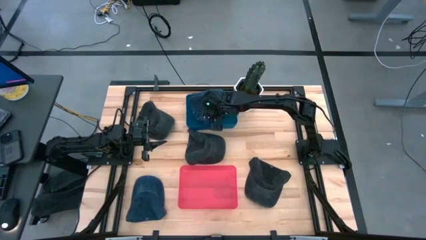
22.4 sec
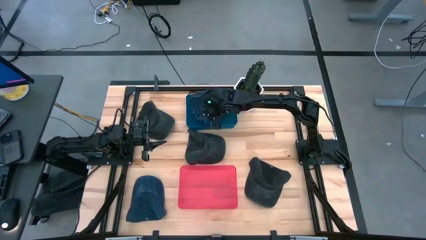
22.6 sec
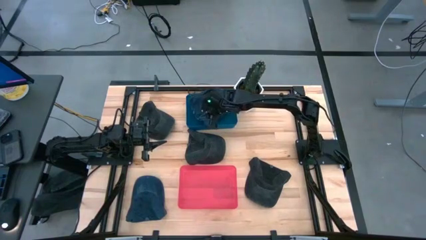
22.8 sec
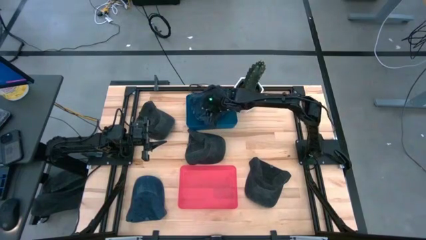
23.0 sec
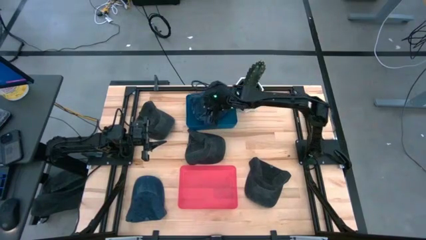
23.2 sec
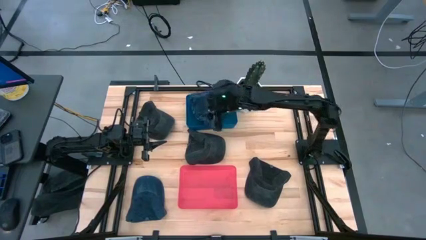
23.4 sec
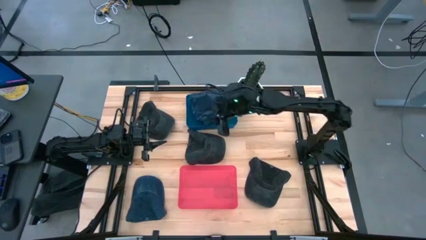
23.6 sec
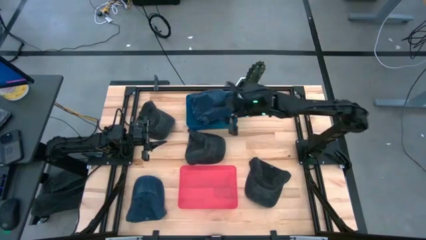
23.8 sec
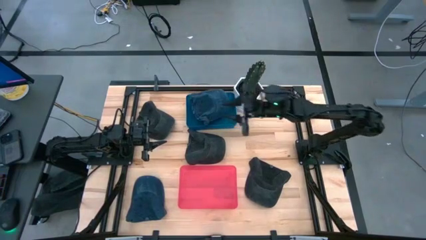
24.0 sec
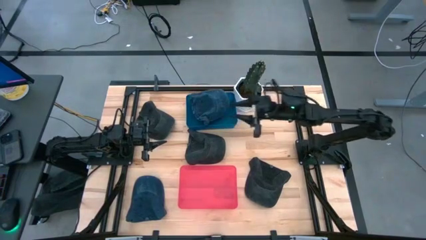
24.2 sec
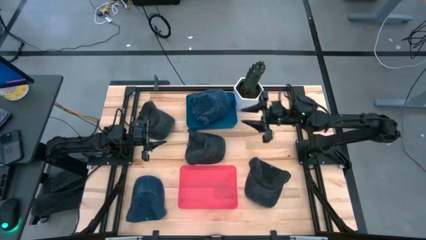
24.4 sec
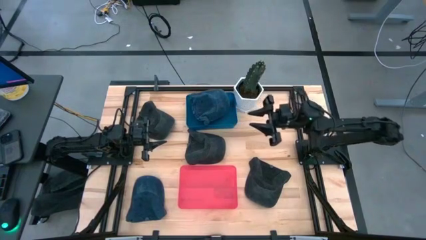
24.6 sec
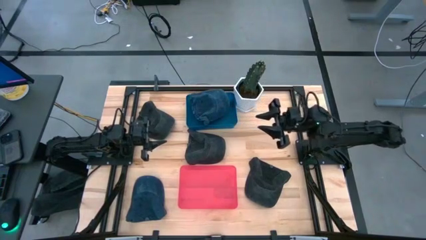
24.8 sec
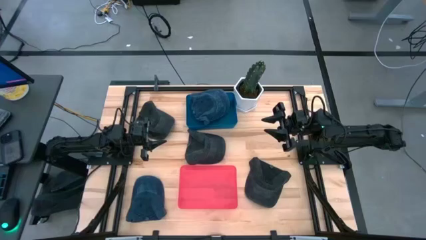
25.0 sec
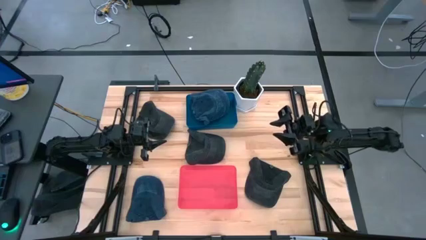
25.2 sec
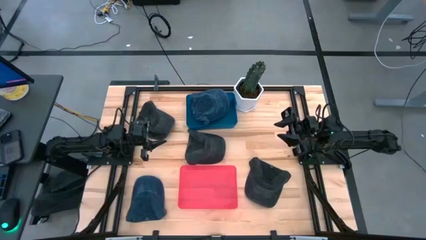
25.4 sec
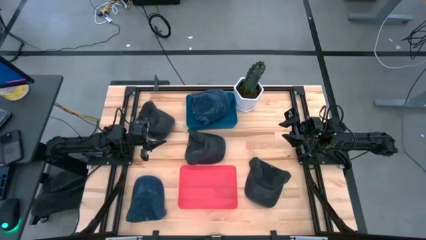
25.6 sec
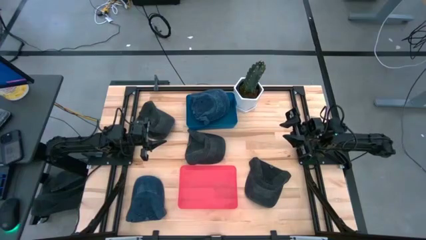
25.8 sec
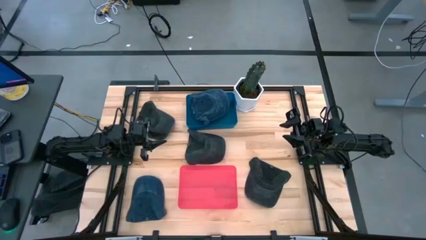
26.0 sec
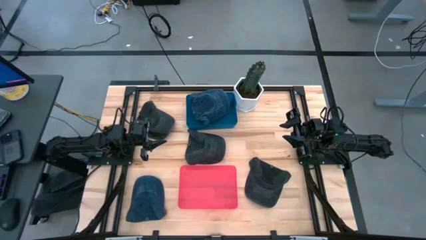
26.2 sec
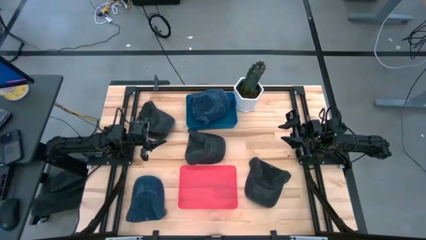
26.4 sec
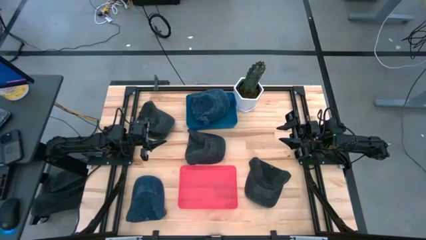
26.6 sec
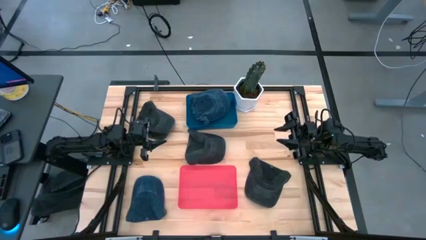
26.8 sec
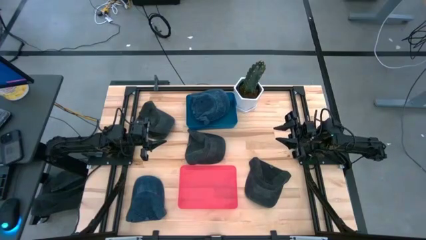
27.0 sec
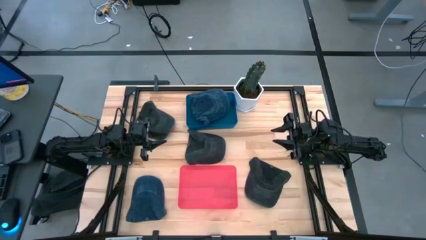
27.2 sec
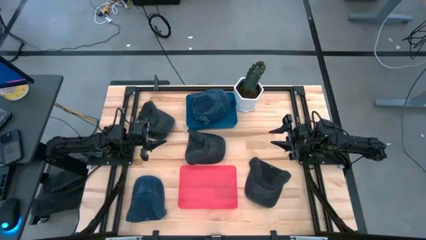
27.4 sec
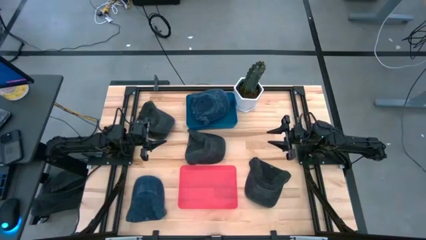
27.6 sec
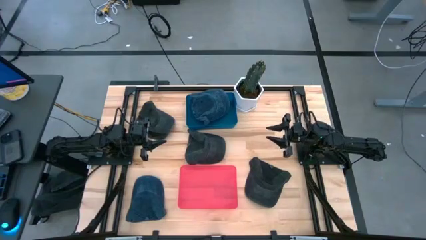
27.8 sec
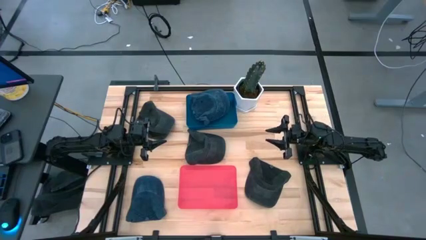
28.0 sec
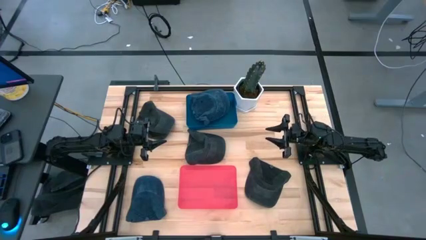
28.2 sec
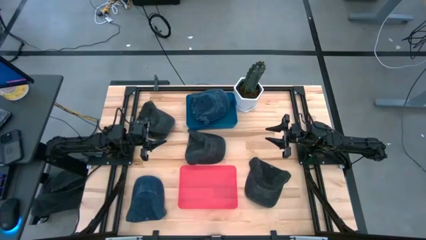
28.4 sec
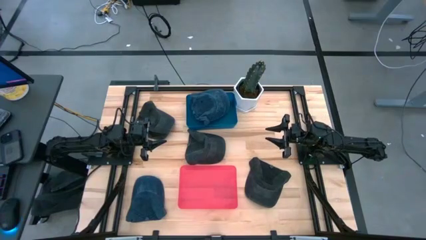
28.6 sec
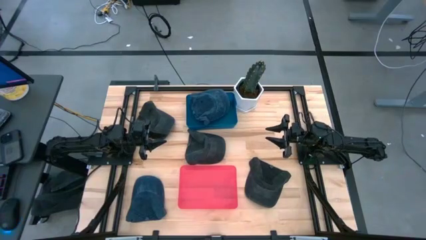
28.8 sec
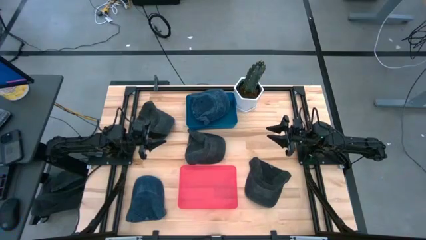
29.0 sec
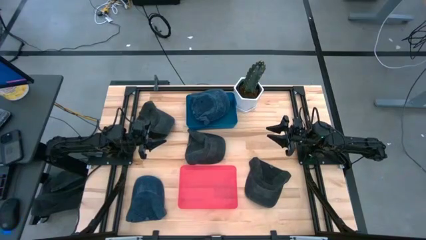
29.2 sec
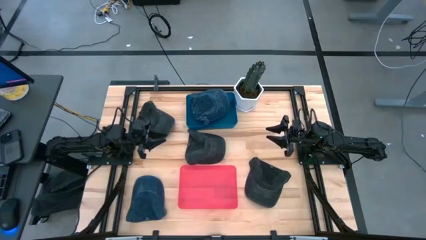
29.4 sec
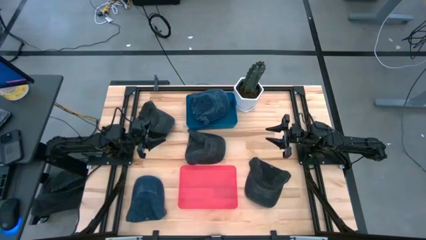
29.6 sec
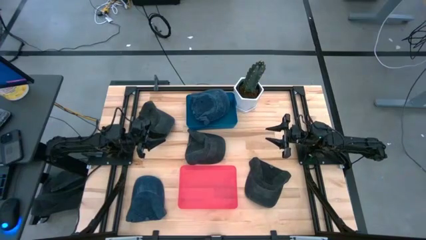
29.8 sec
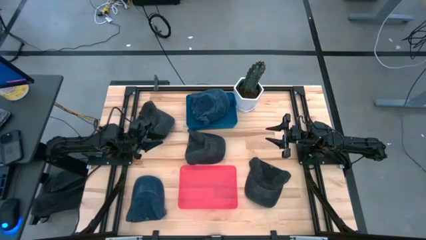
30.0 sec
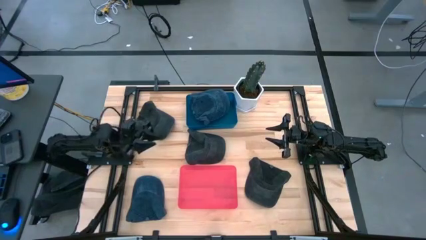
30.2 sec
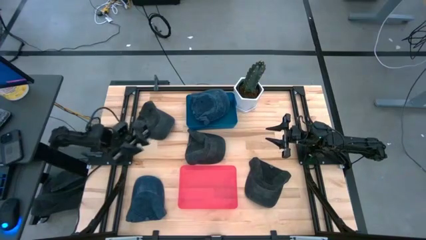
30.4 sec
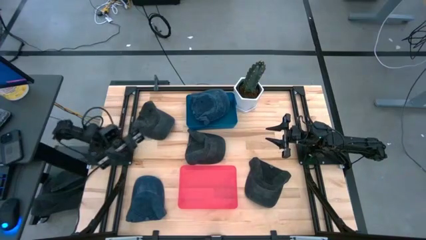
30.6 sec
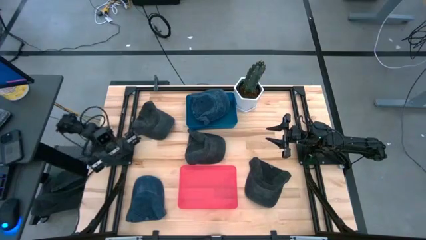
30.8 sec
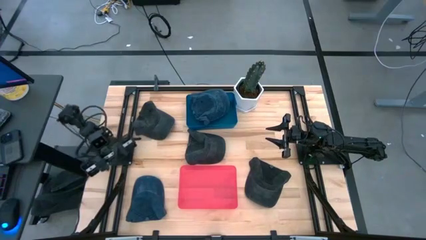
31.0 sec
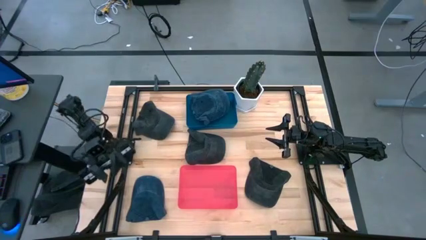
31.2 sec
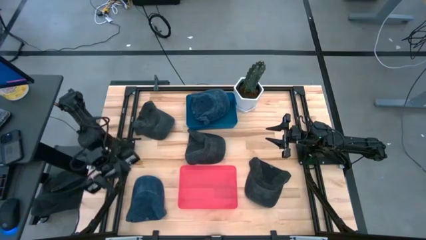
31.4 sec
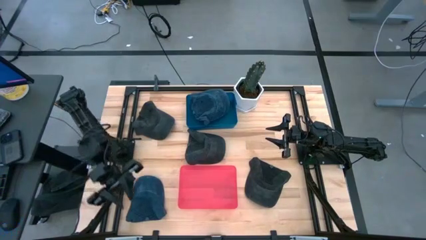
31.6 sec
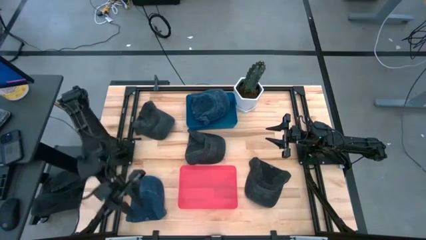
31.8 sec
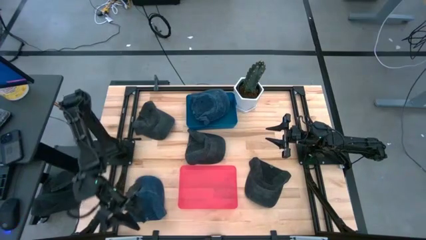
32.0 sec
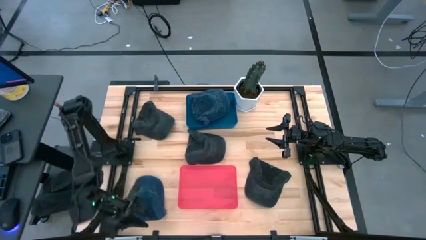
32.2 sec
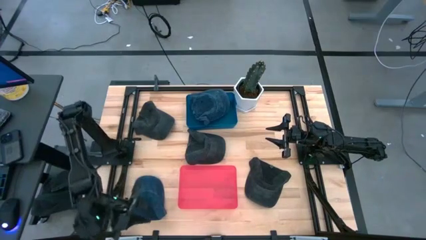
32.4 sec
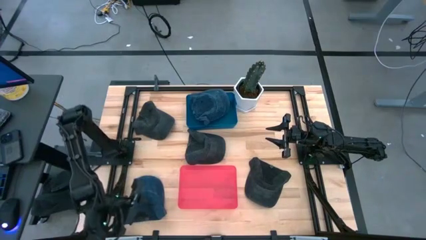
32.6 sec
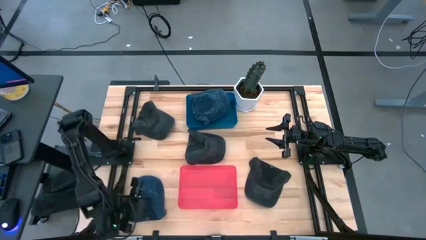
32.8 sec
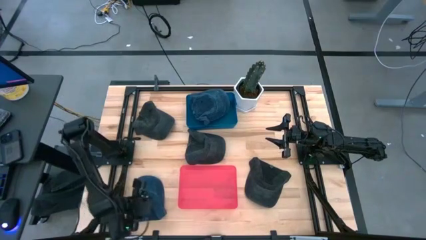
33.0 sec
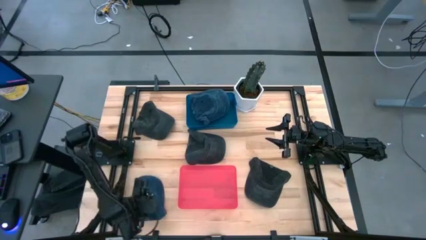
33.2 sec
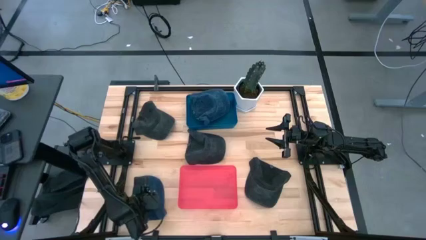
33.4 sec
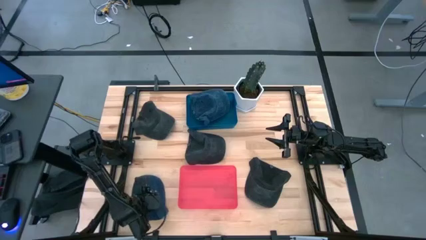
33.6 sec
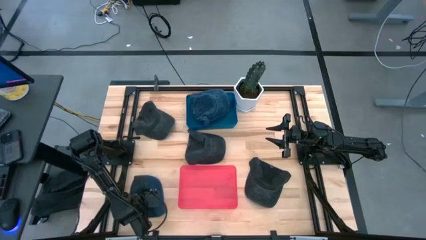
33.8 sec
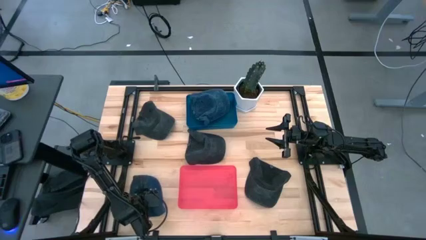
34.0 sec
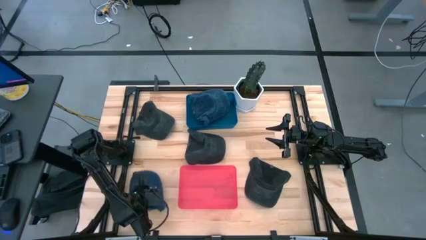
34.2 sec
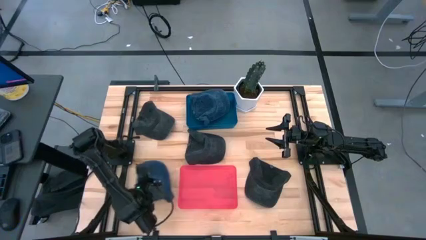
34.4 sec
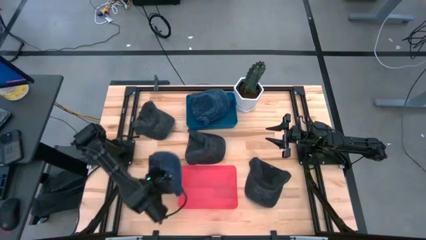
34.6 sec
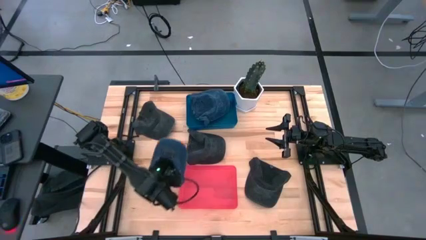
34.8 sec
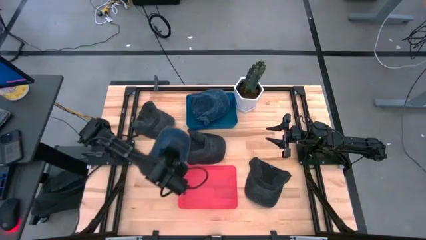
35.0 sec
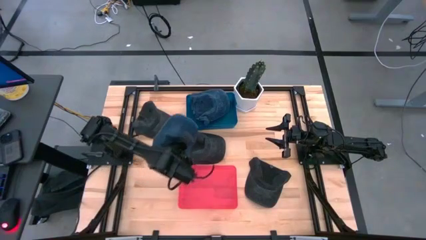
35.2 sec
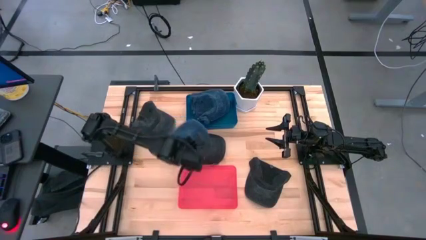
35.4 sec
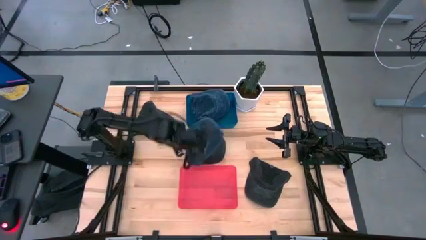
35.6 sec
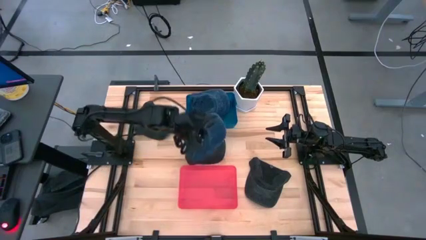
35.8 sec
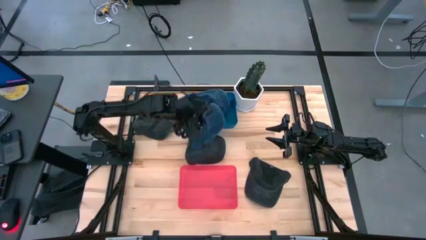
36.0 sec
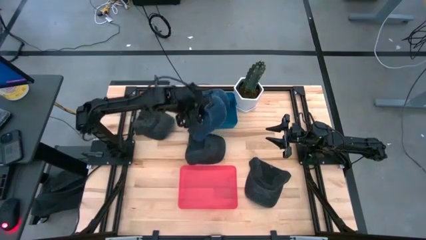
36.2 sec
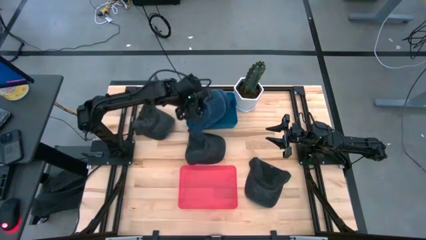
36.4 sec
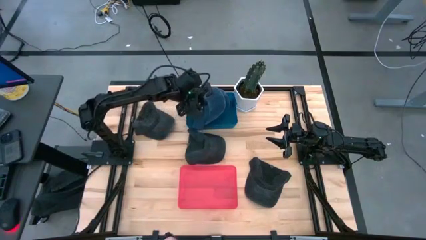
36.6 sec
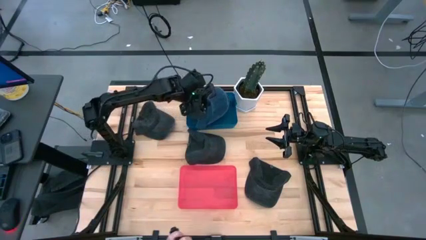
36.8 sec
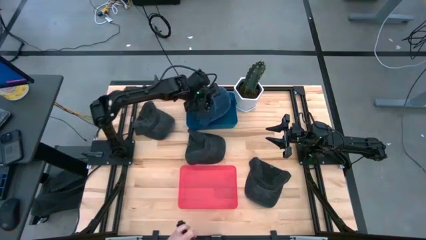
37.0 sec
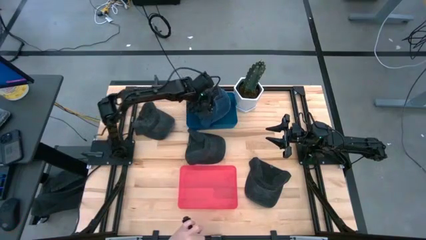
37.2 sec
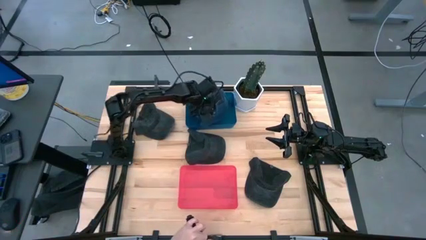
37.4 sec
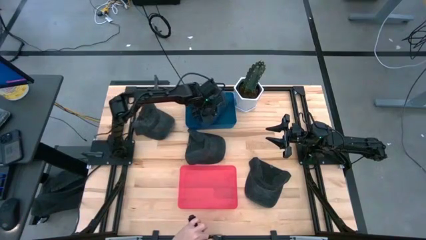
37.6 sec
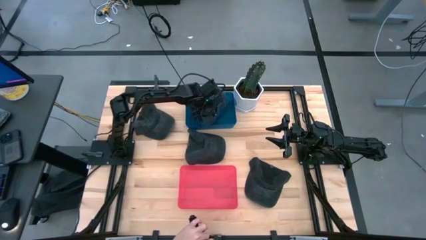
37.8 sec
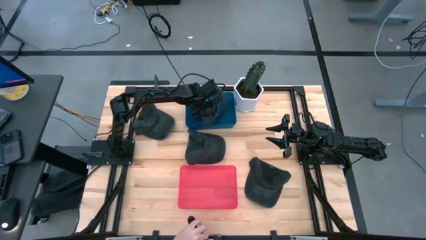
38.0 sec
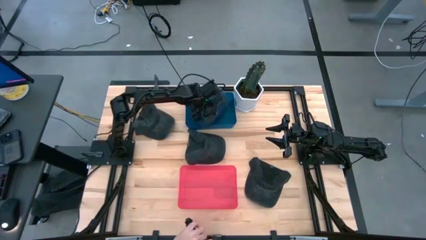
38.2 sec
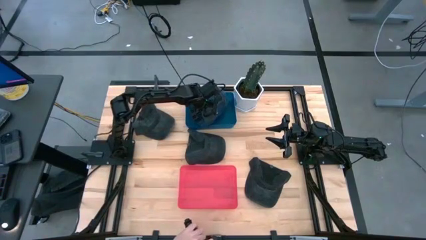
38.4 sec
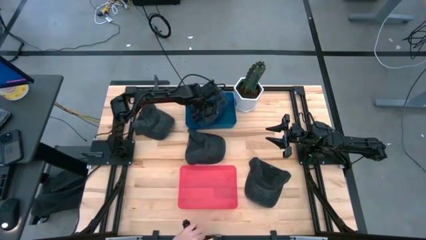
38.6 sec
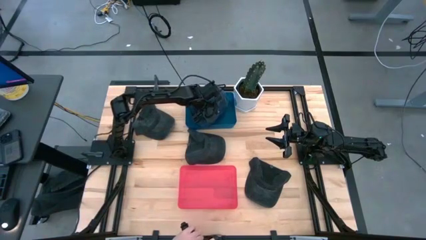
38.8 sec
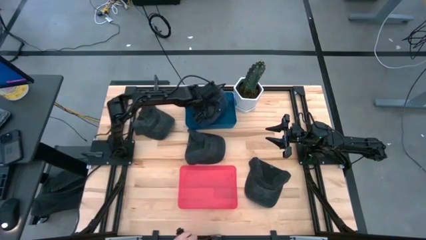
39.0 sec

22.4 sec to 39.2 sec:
Task: Pick & Place hat
Put the blue cap into the blue pin
